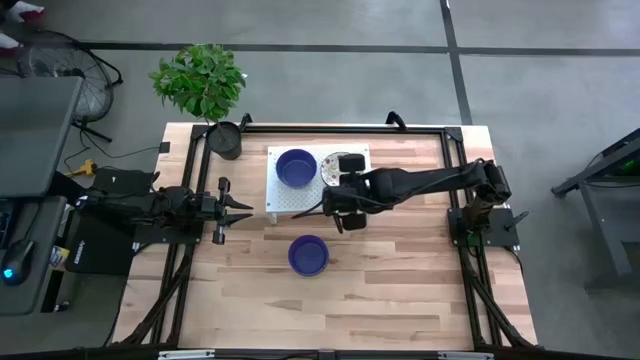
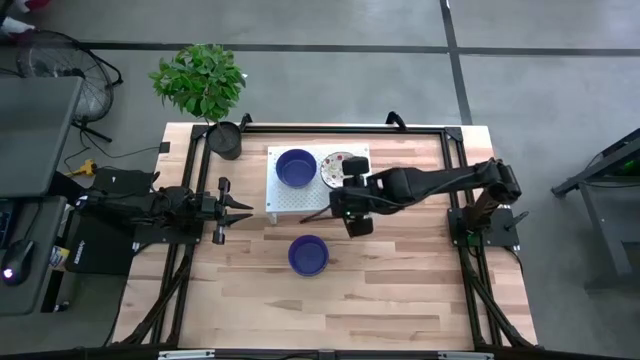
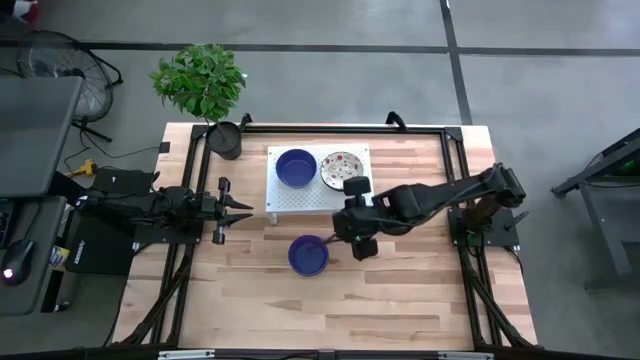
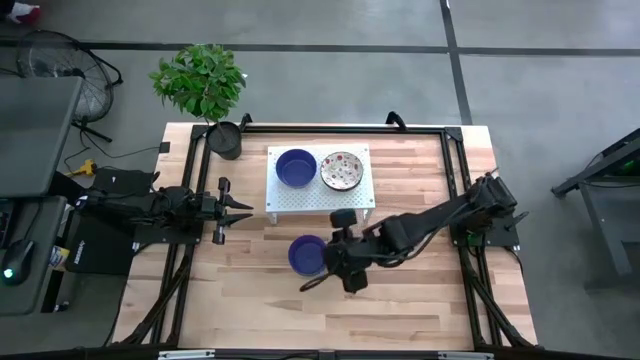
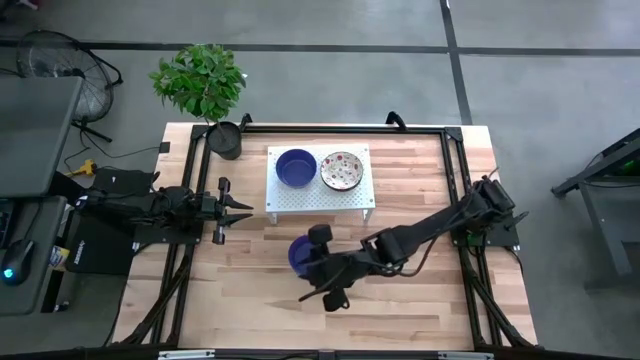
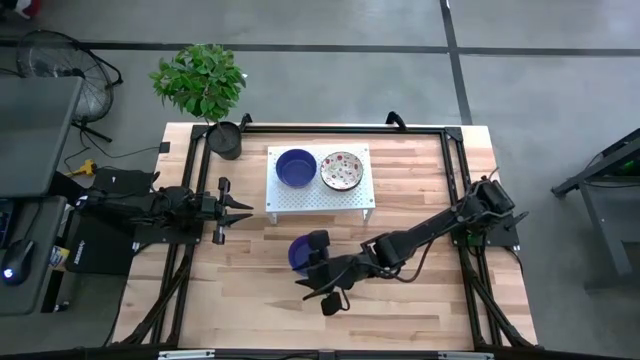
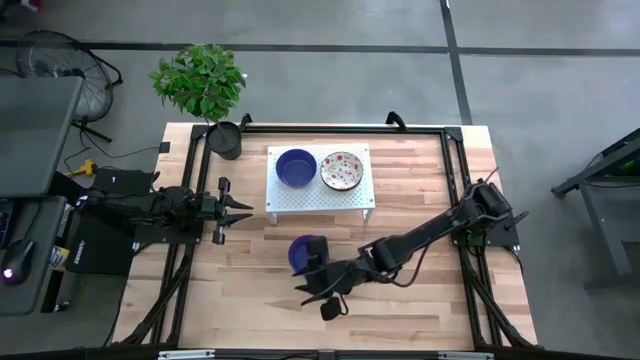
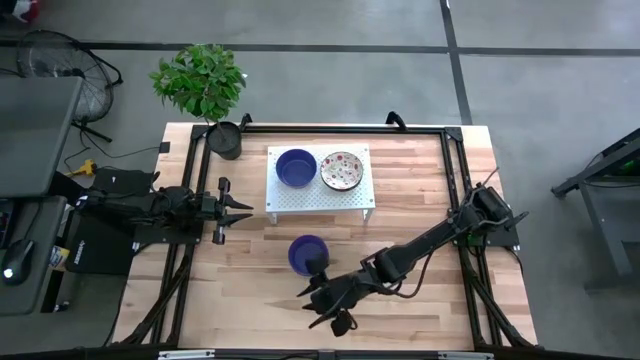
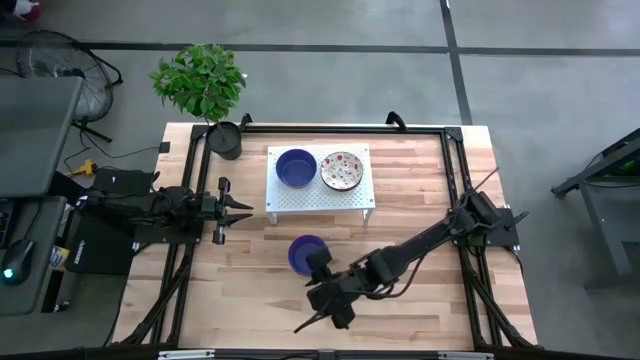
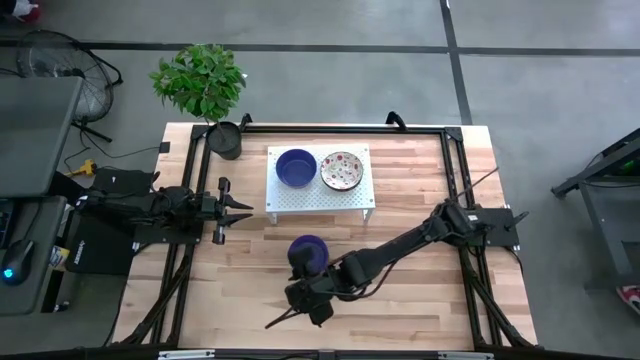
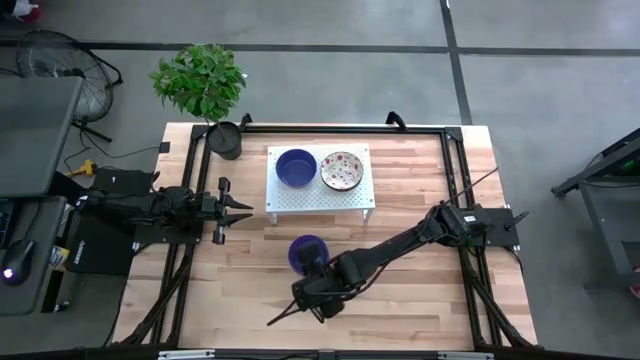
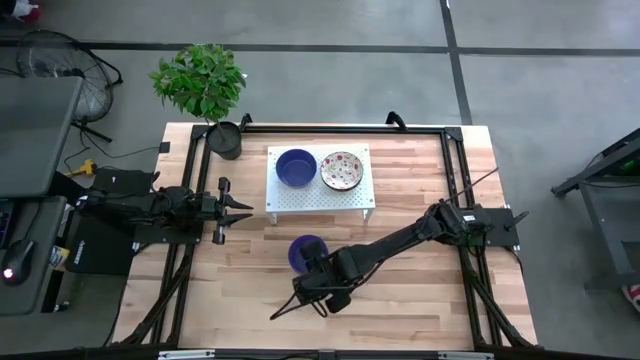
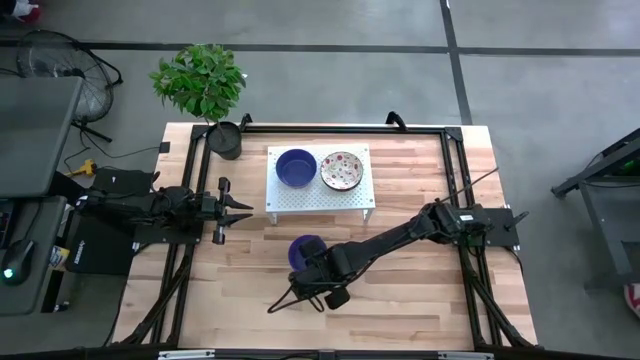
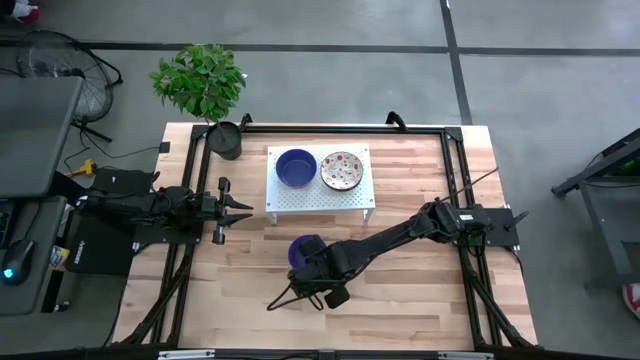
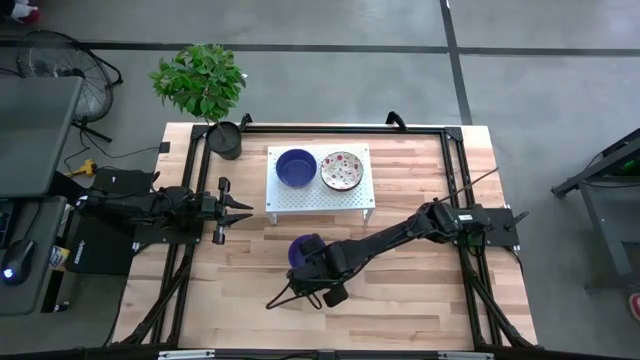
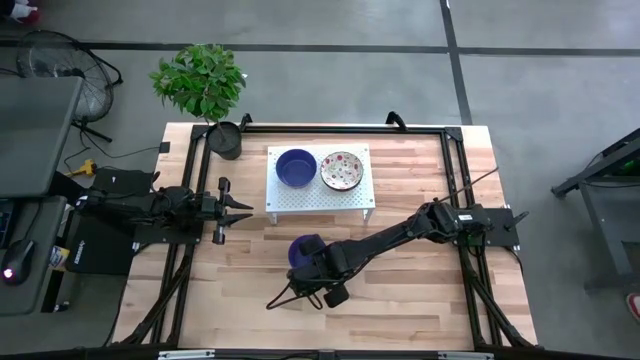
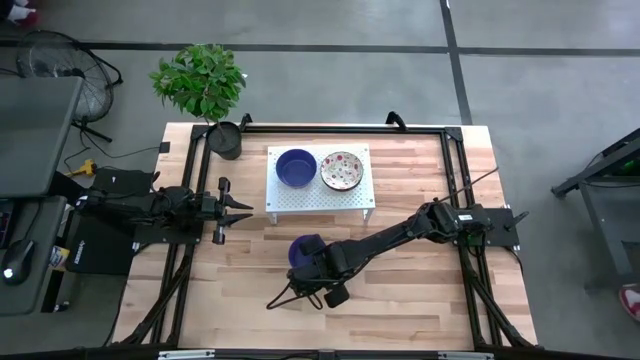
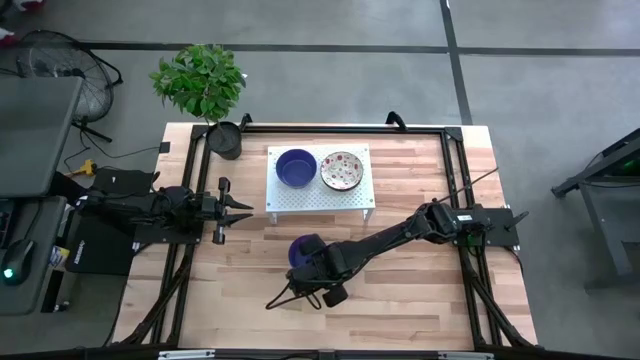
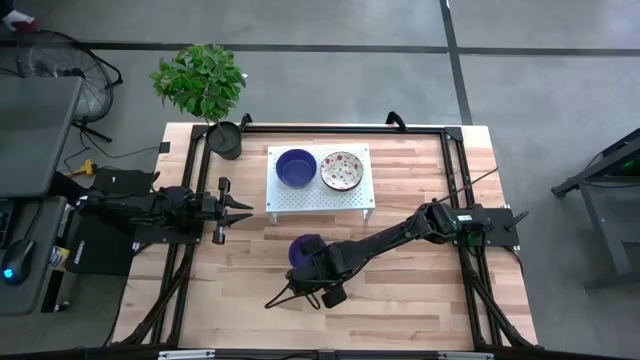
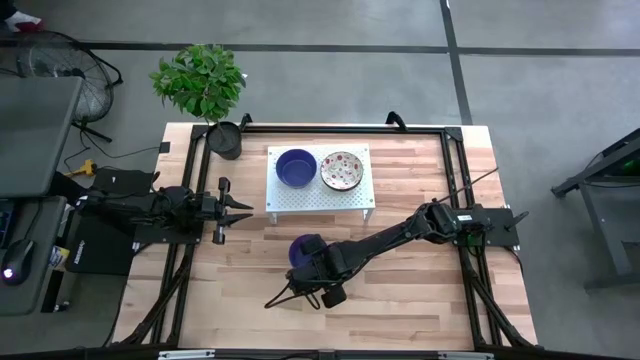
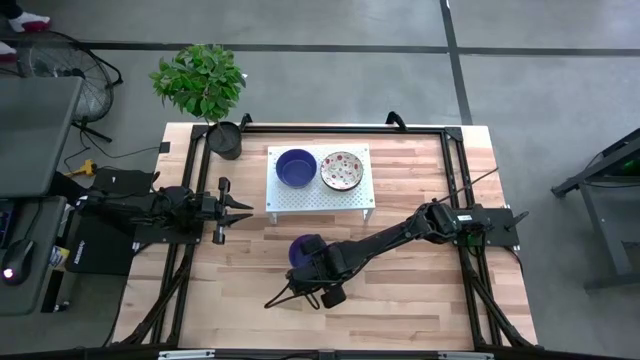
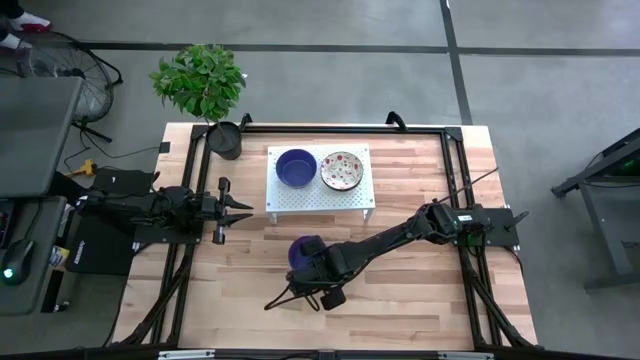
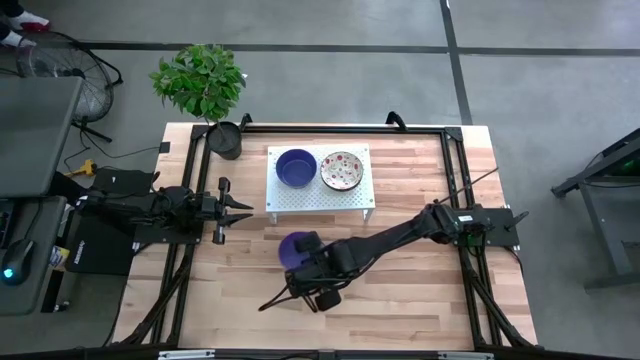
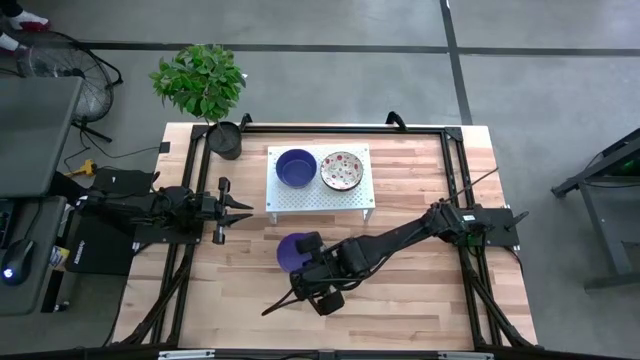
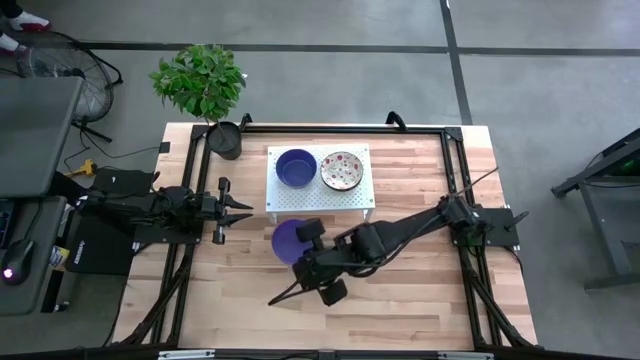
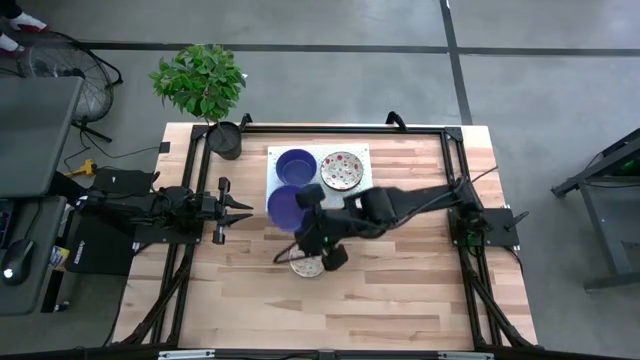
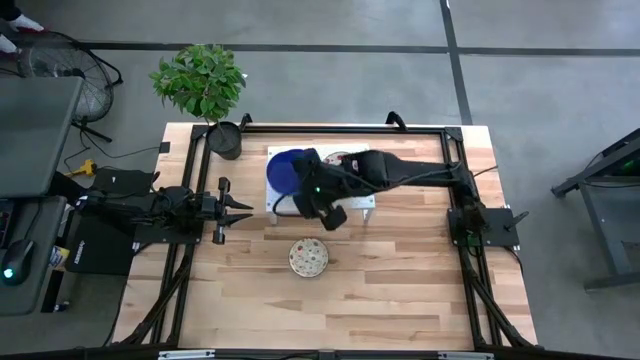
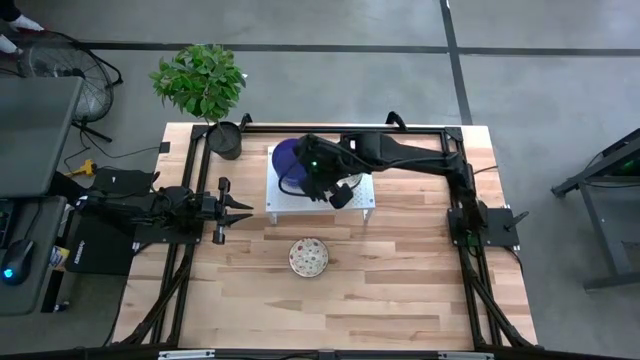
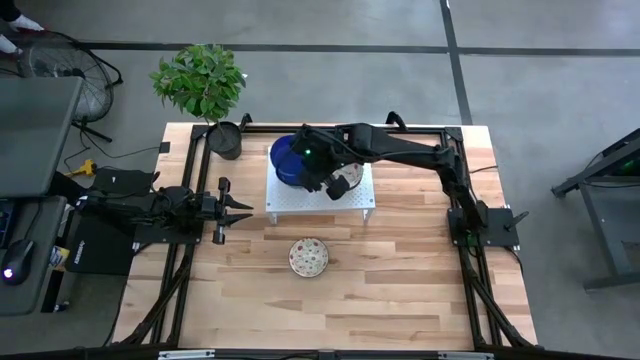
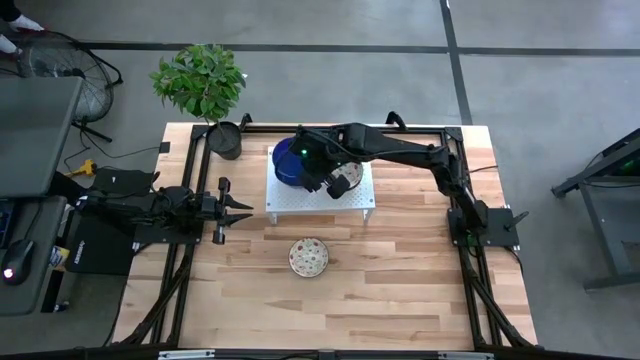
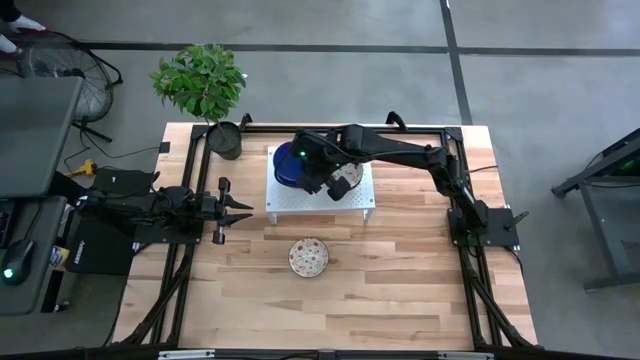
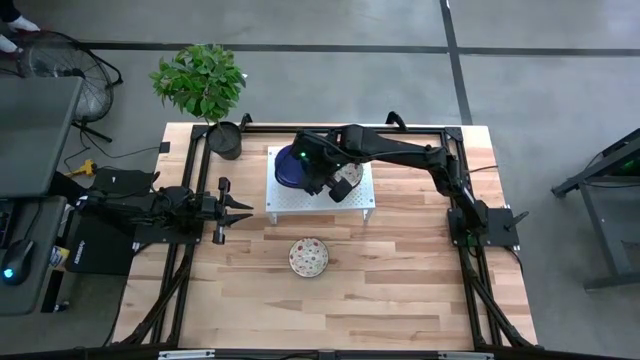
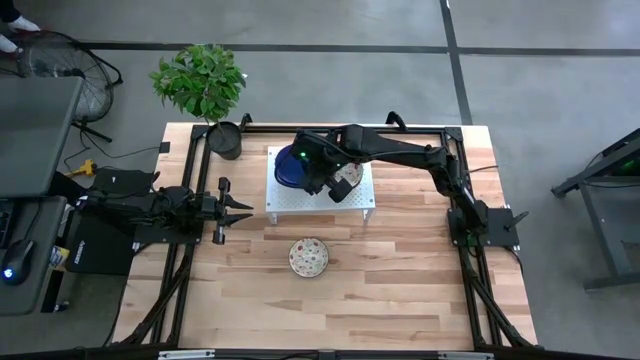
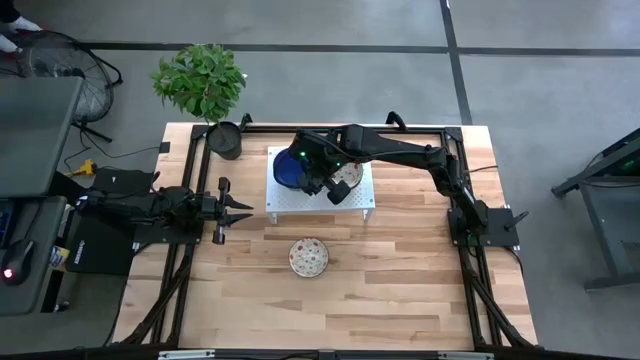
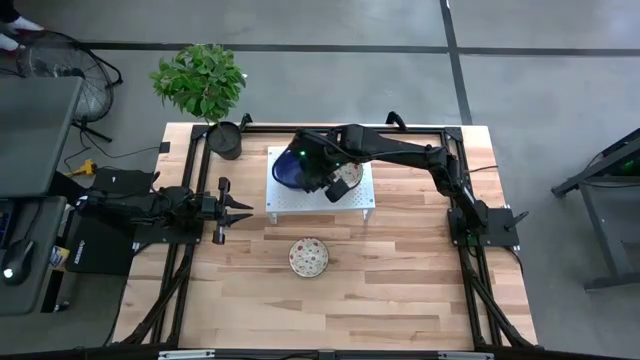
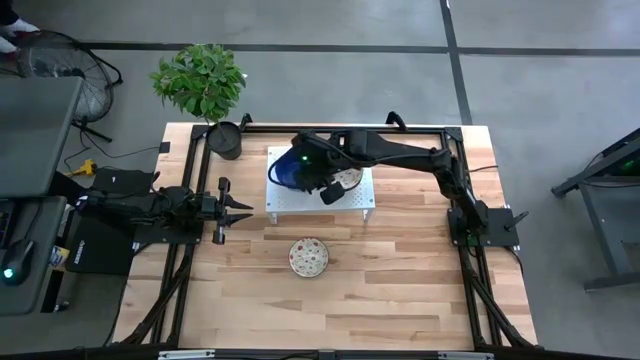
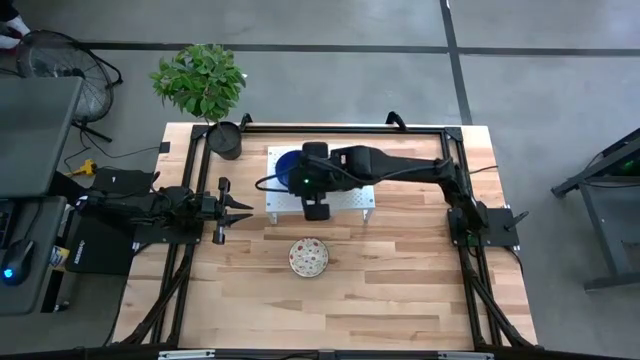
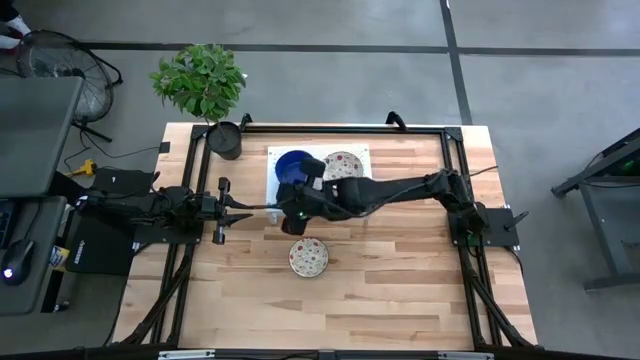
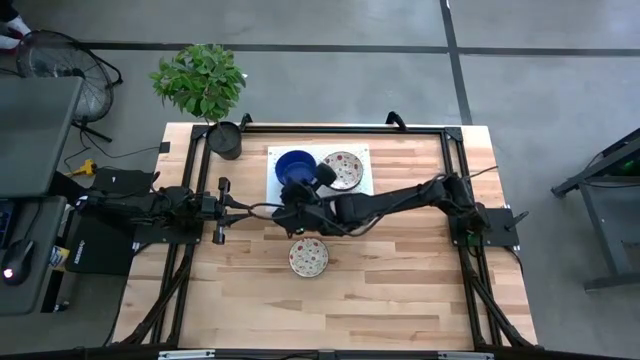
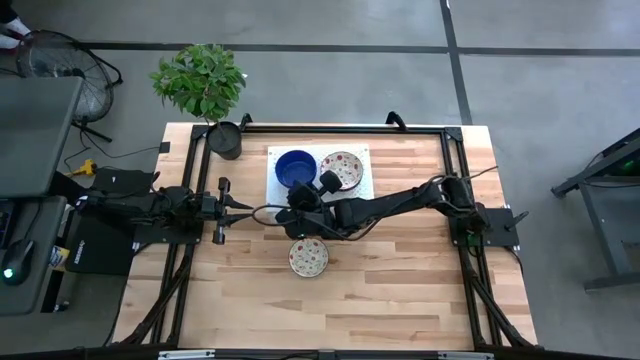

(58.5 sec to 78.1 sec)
Task: Pick & Place Mini bowls
Stack the violet bowl on top of the violet bowl on the shelf

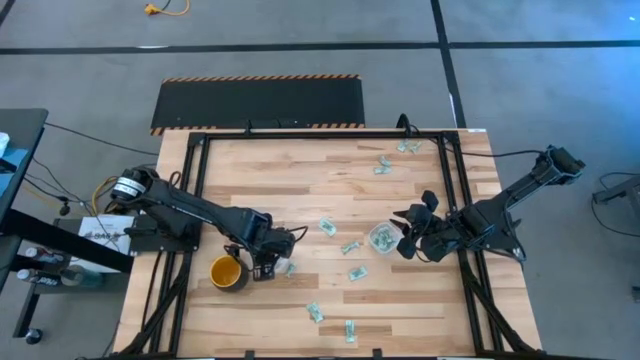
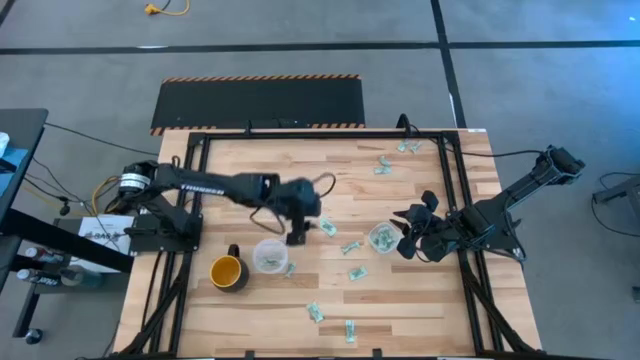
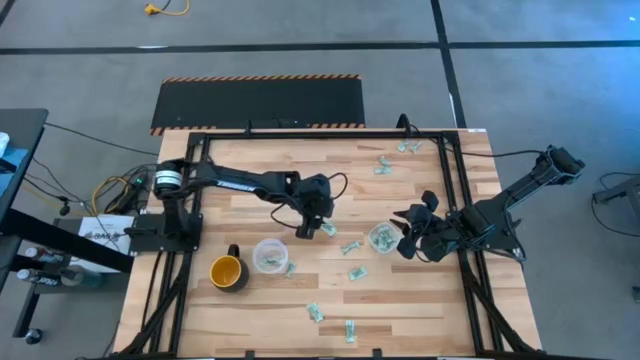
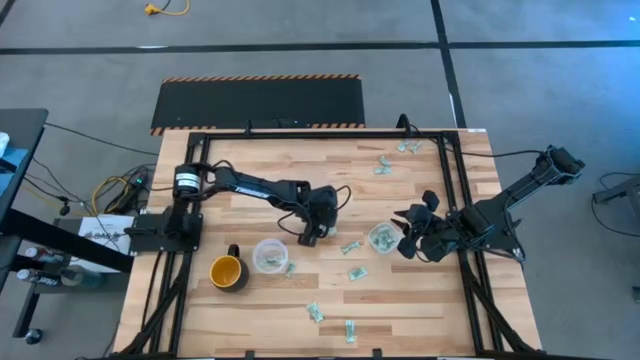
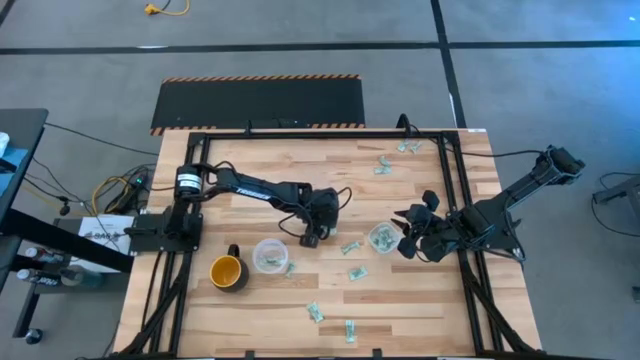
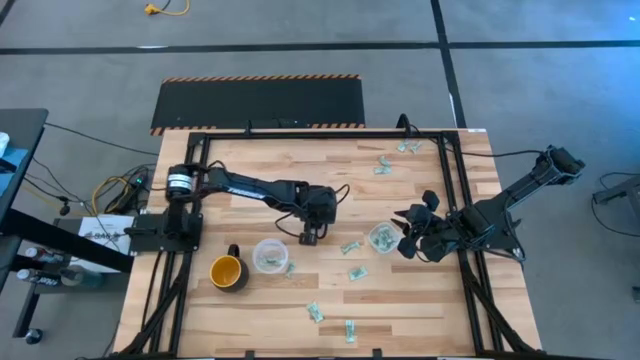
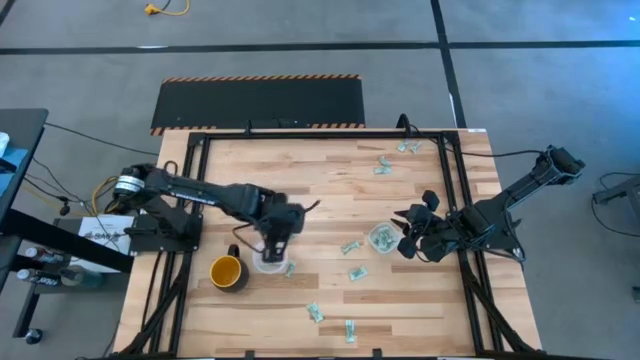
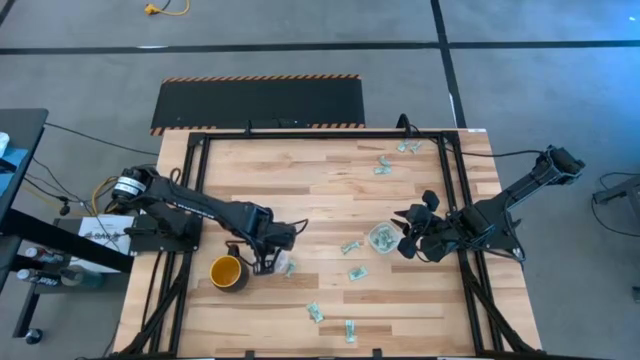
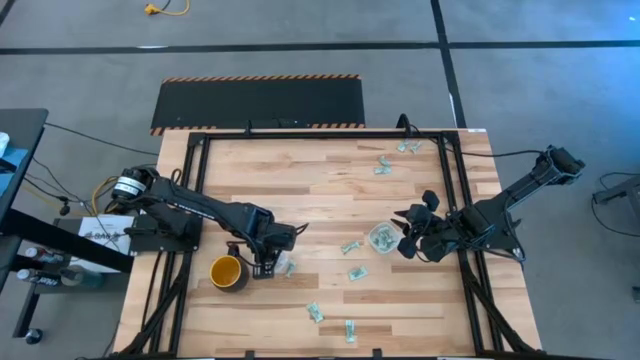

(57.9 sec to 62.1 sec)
Task: Pick and place Stevia / Truvia into bins
Put the white stevia packet into the round transparent container
